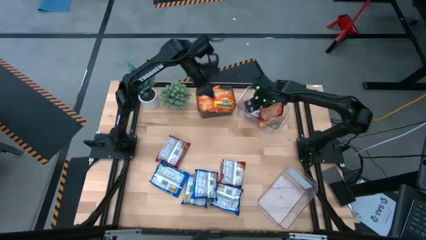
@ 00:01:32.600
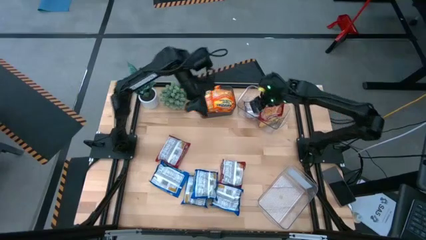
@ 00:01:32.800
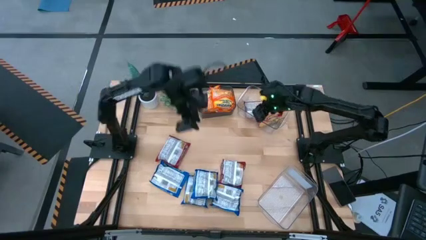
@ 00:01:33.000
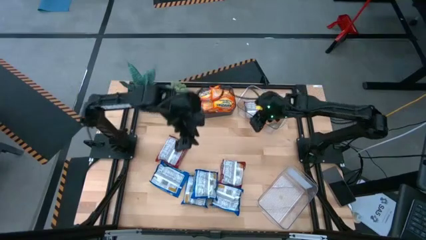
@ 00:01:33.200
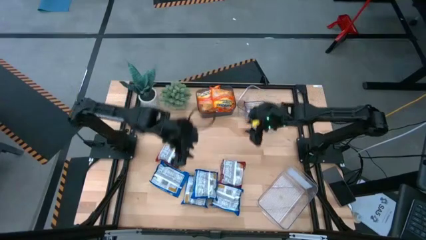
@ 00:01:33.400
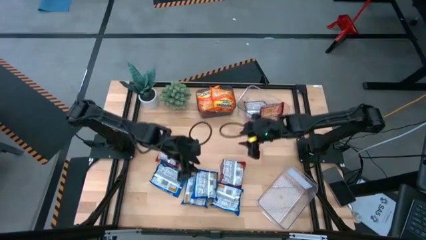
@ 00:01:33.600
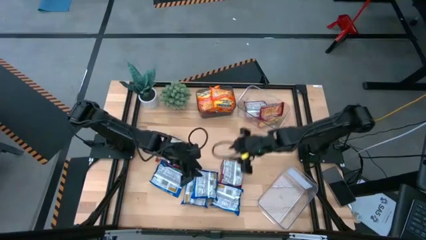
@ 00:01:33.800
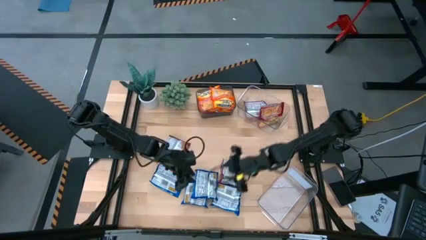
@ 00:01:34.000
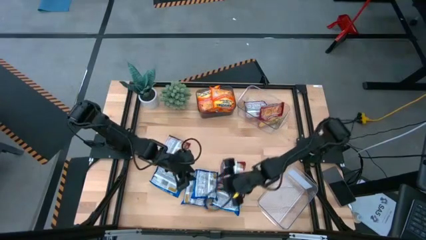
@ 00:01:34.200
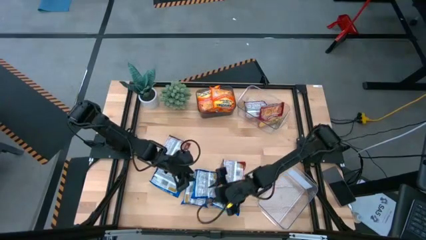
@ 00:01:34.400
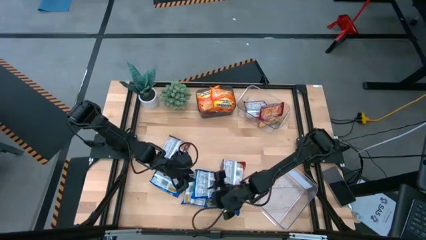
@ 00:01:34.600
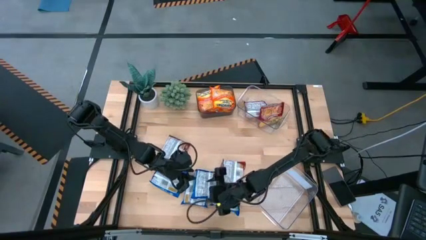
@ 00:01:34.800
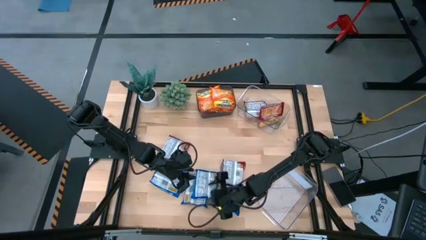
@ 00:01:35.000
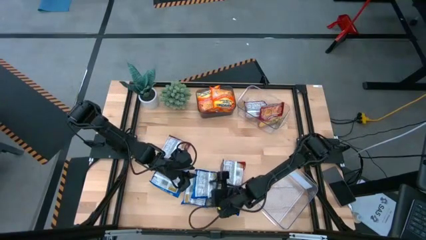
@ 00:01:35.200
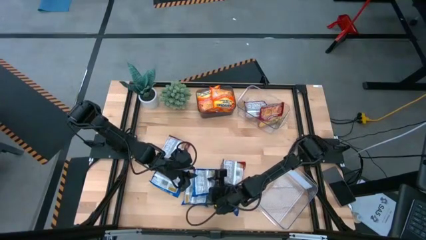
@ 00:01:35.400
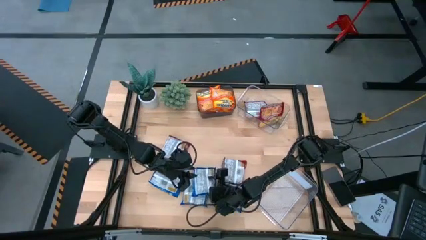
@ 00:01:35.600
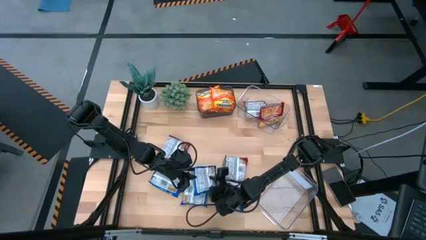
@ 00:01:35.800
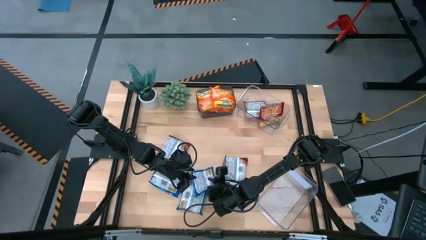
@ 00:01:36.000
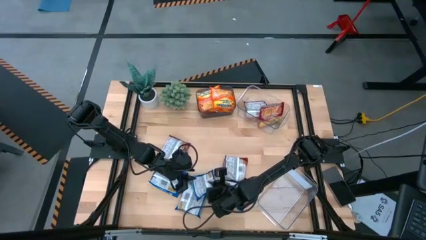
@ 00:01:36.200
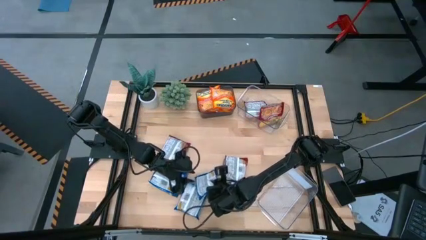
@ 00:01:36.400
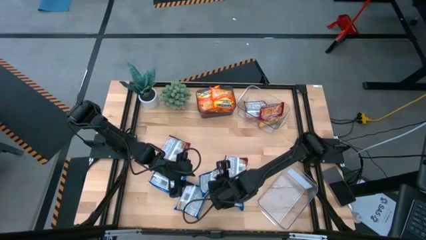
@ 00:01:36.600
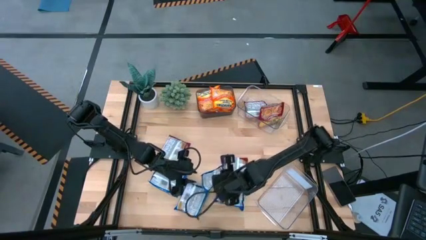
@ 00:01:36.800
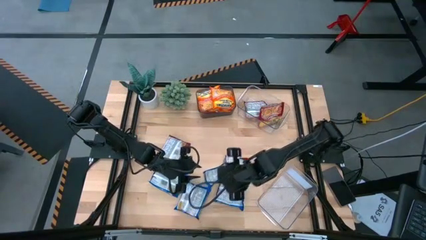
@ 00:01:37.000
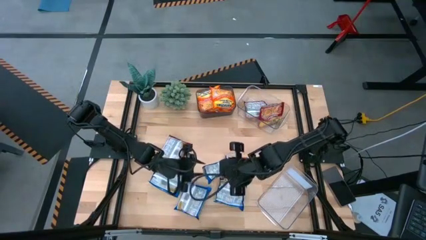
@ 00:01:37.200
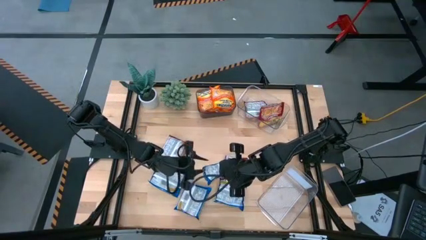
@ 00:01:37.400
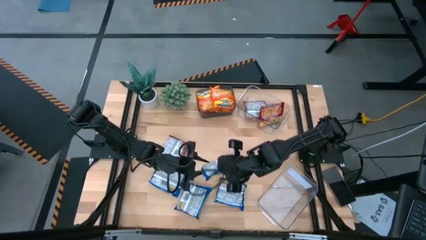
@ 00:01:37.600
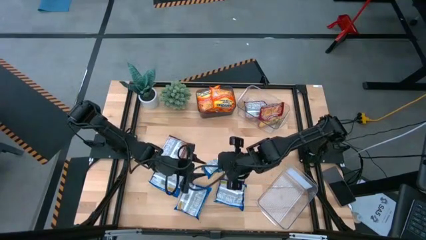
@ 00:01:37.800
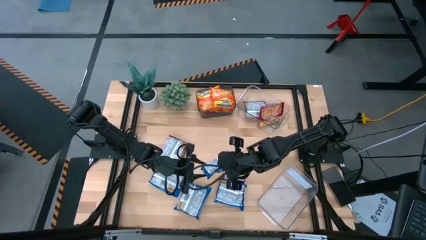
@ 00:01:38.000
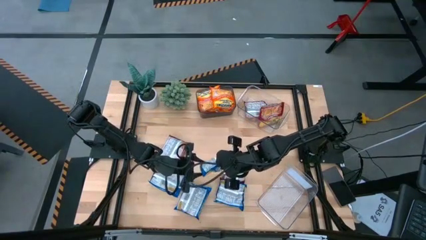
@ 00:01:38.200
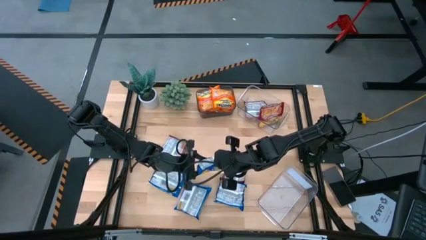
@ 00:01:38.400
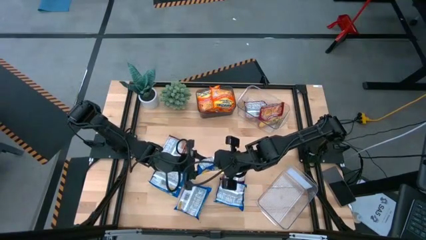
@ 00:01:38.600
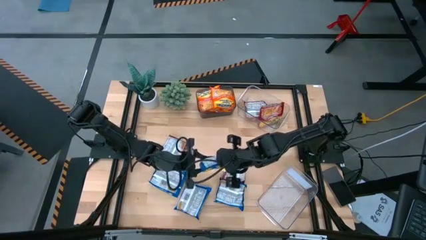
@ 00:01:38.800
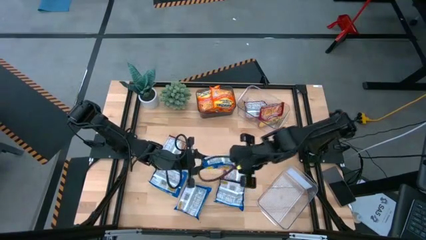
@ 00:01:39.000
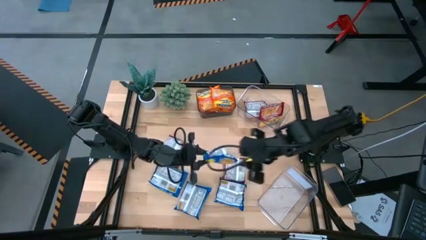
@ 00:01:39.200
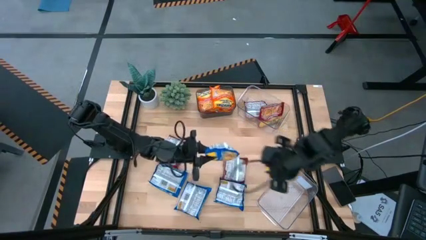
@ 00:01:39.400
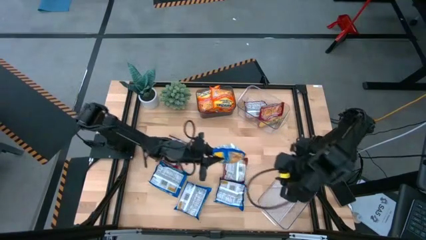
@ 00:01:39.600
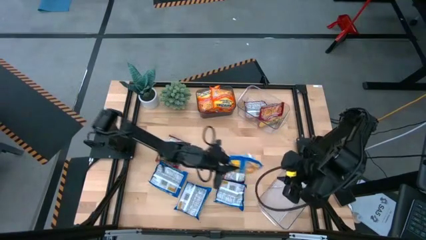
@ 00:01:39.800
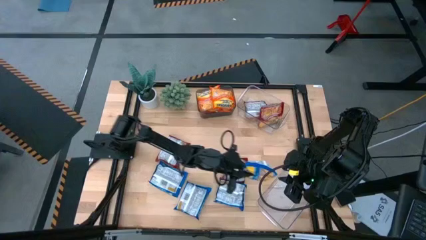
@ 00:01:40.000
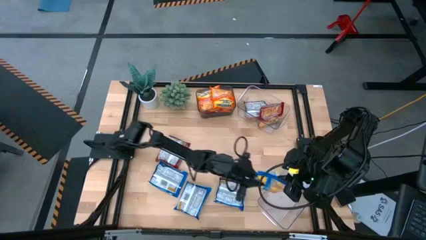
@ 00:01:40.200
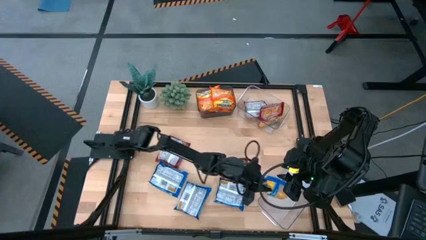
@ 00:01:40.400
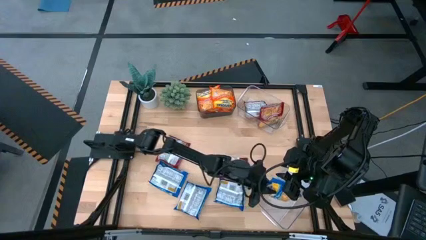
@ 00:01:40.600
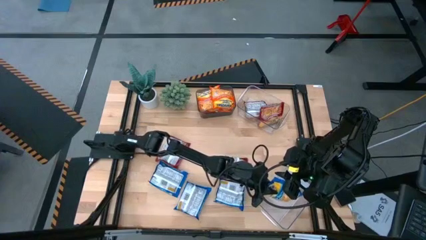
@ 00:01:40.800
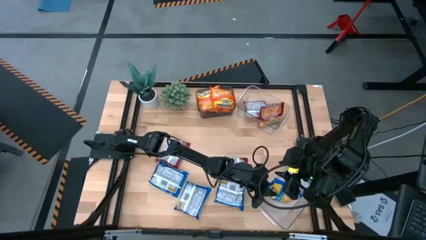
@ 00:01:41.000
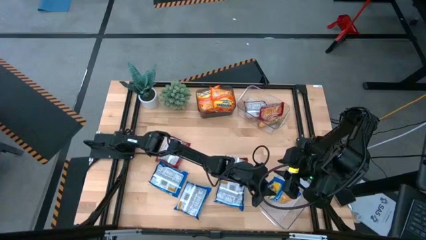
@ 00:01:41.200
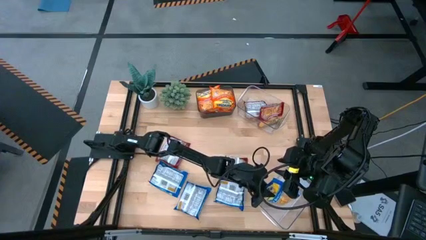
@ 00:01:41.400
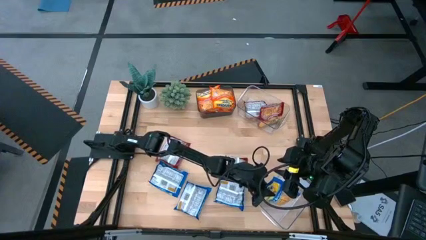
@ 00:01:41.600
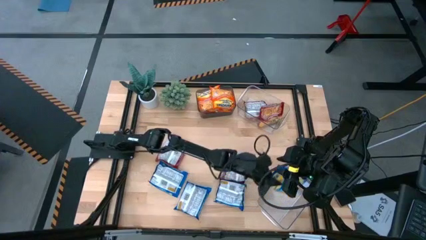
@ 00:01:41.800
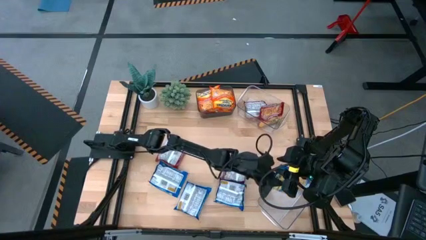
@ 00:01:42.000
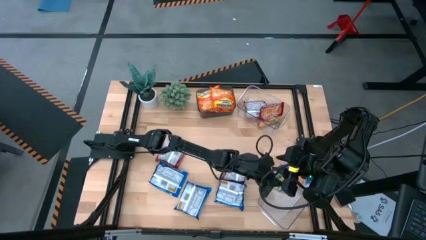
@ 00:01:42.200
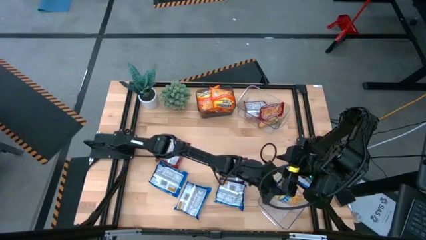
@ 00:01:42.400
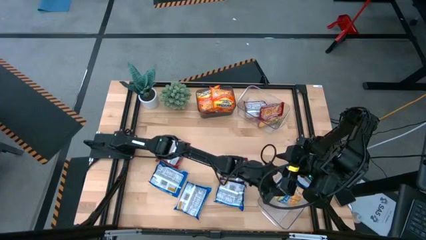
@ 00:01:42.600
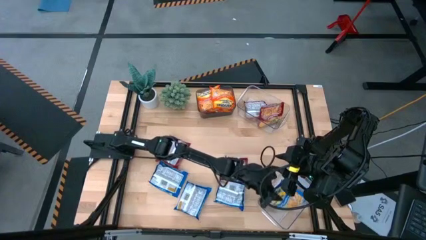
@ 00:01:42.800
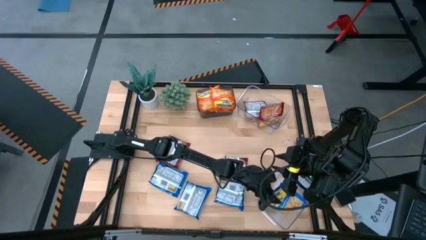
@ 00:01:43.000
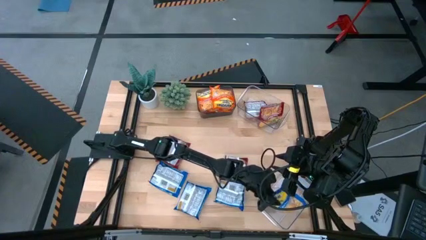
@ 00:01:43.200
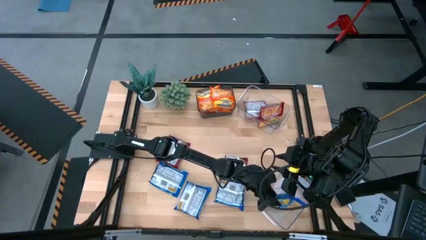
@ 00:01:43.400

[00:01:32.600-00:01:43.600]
Task: Sort Maruchan noodles
Put the blue noodle pack into the bottom transparent bin

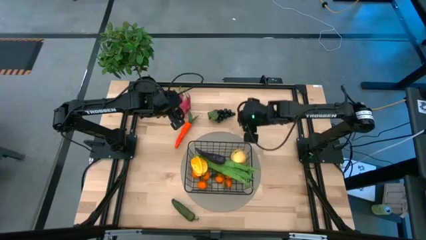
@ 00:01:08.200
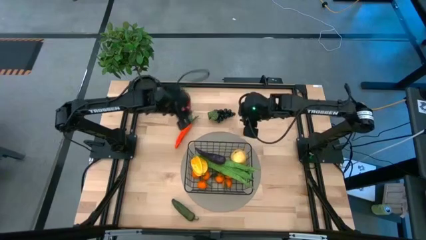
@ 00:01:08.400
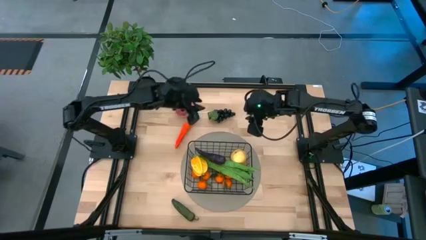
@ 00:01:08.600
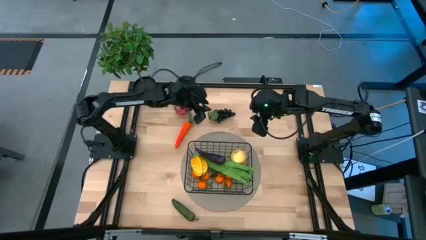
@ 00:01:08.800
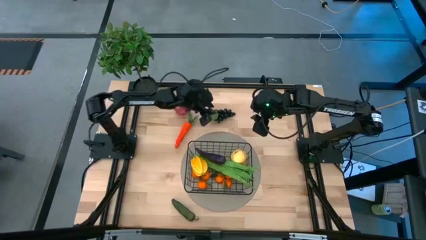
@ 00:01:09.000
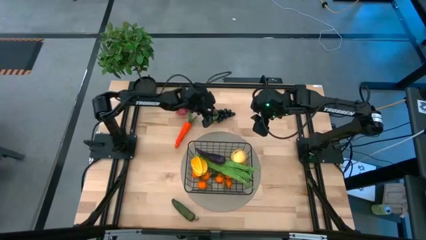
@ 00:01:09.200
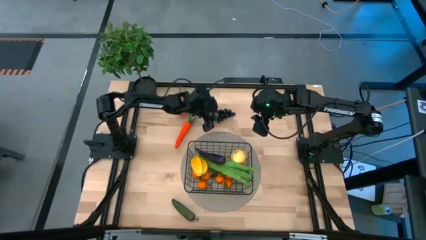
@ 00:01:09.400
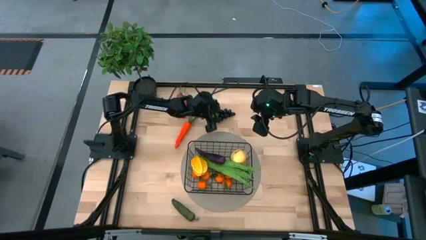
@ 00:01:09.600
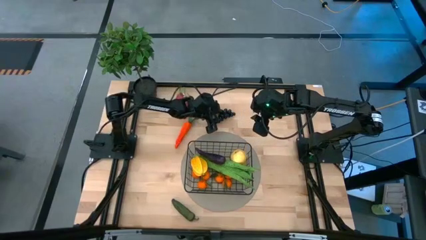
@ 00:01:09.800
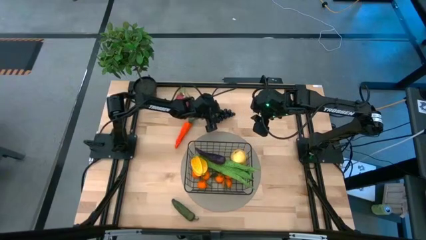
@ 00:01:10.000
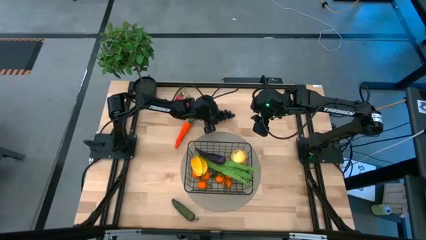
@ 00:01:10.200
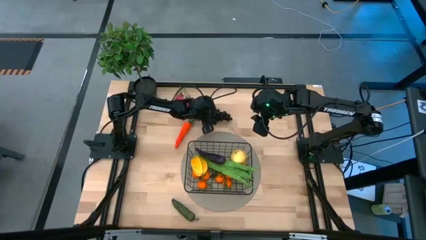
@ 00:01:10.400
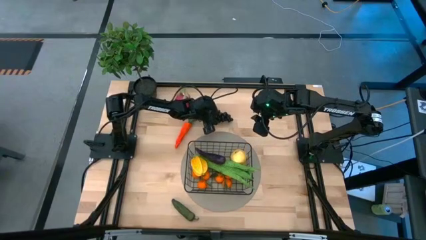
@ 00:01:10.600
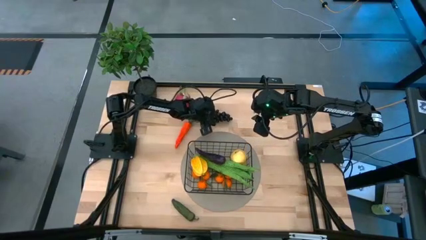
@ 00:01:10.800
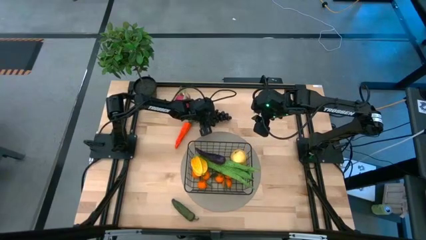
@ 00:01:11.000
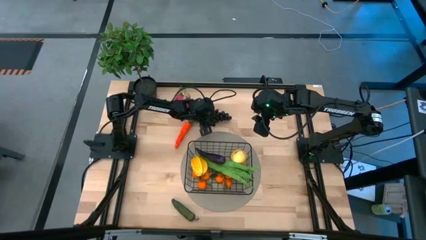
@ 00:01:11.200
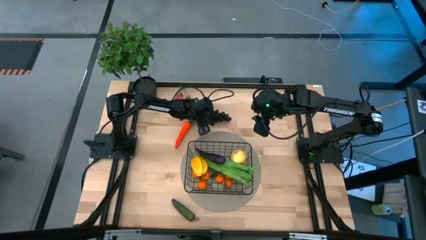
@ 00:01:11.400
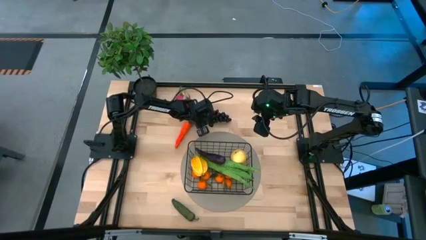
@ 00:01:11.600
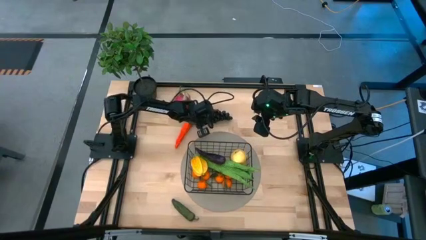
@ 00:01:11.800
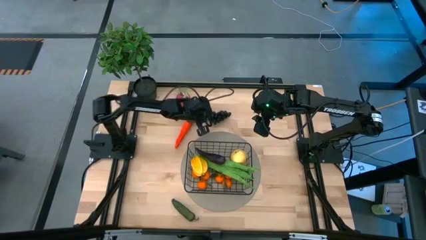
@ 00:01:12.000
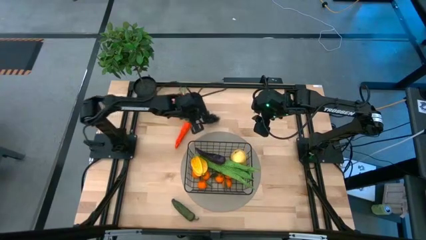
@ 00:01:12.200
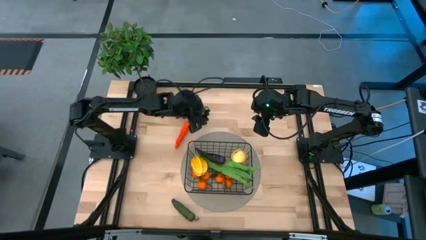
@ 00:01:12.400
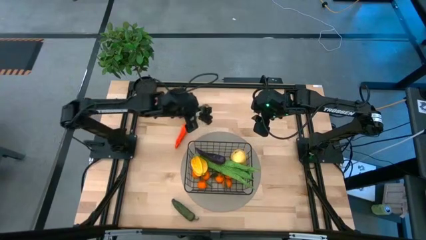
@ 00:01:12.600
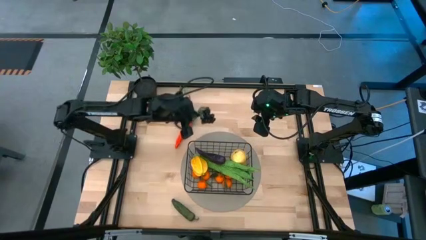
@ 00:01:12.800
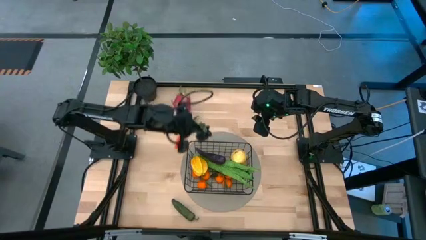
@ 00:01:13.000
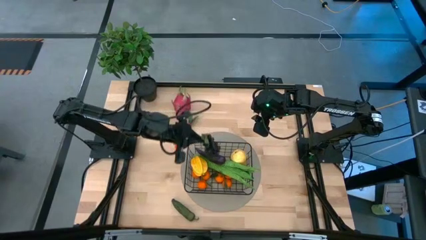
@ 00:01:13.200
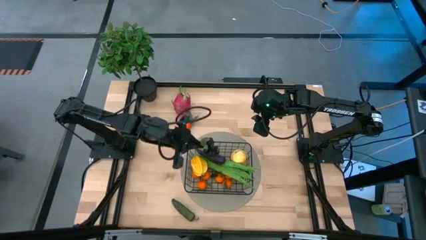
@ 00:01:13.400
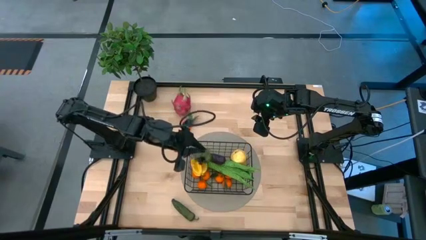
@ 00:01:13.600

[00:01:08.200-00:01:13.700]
Task: Build produce basket
Put the grapes into the black basket
